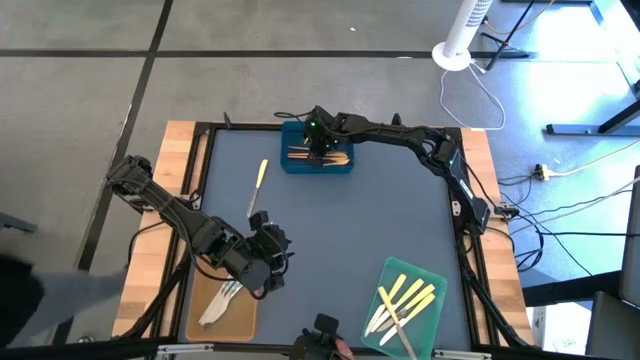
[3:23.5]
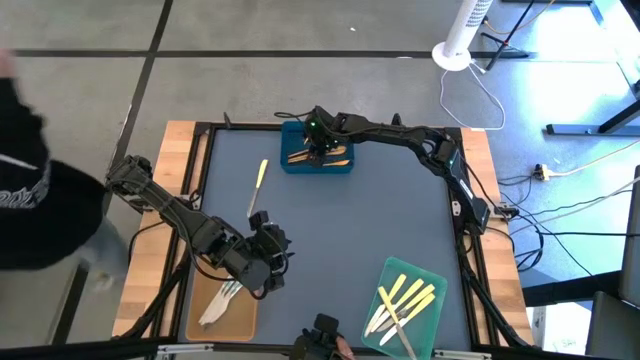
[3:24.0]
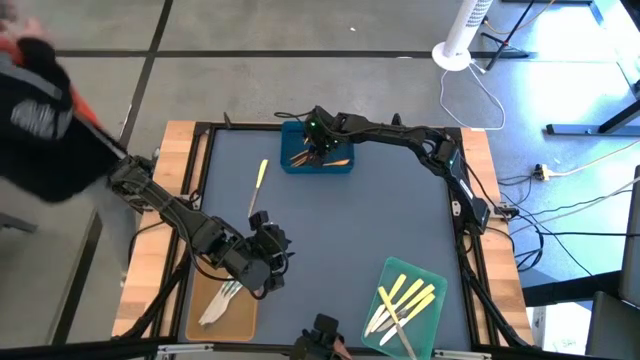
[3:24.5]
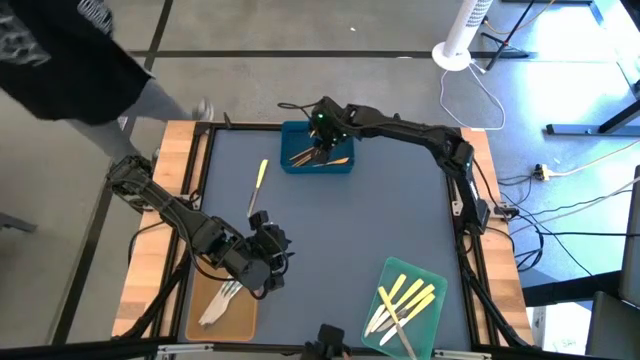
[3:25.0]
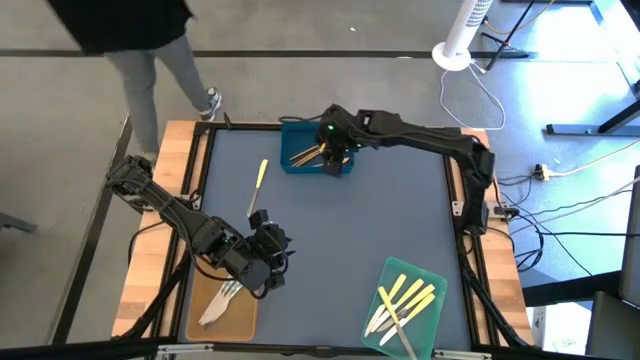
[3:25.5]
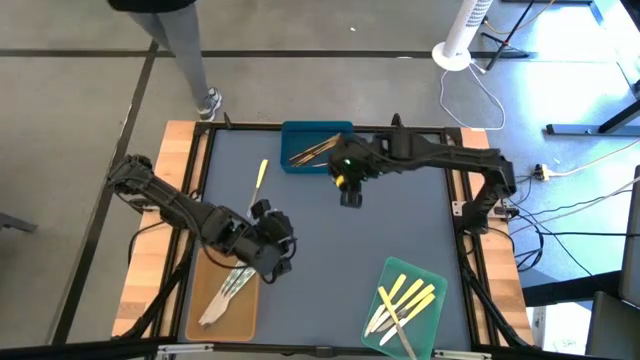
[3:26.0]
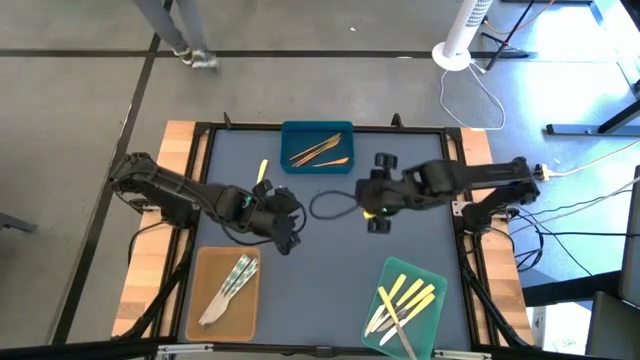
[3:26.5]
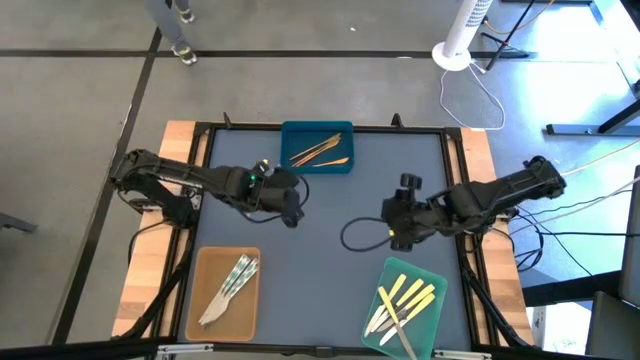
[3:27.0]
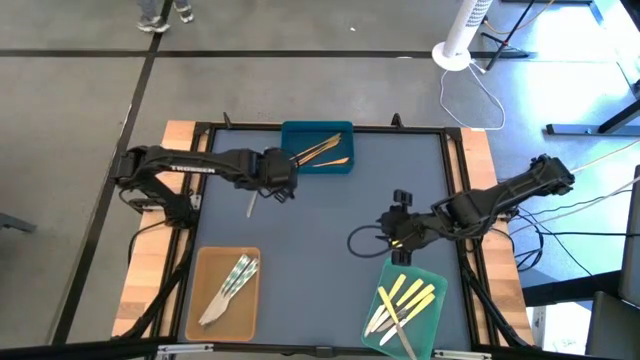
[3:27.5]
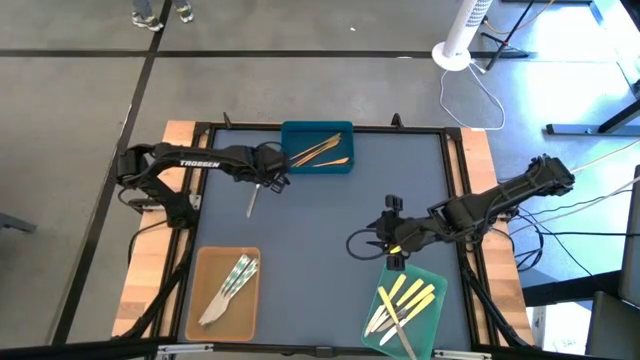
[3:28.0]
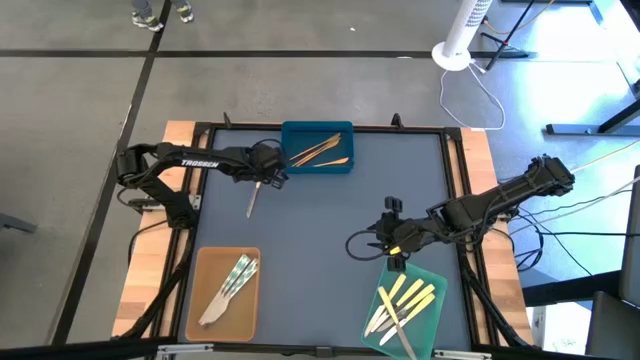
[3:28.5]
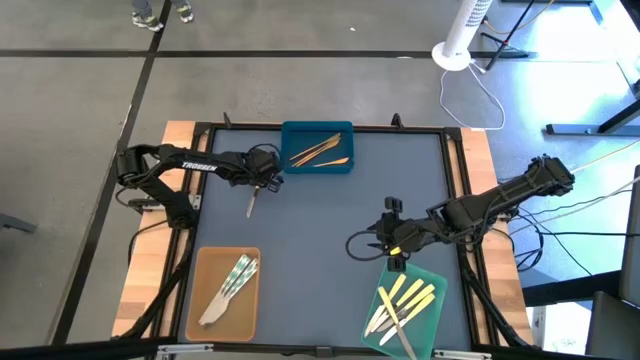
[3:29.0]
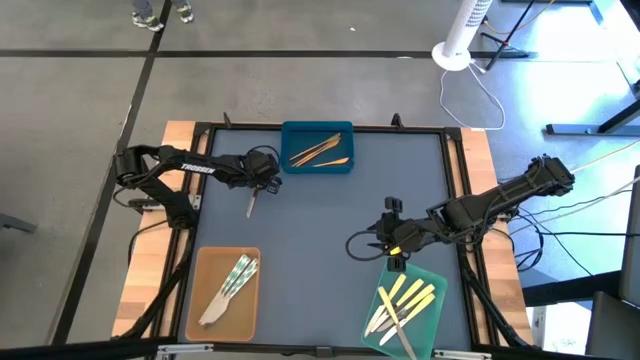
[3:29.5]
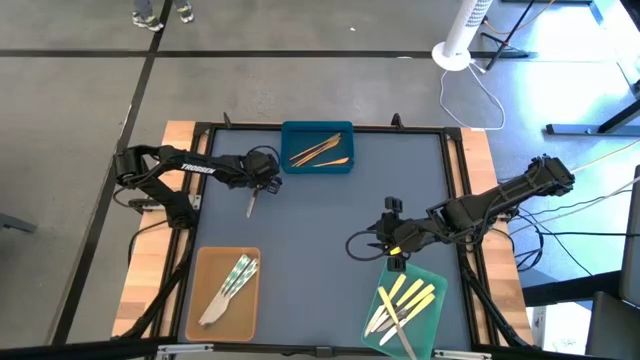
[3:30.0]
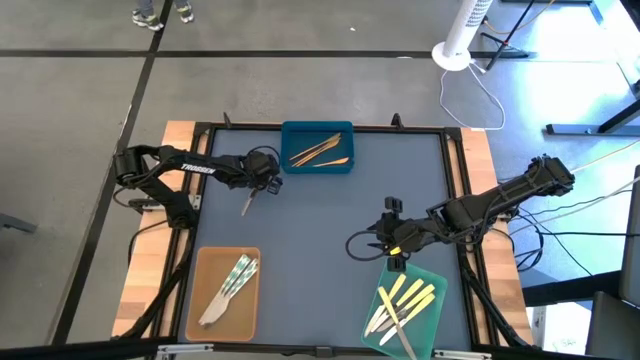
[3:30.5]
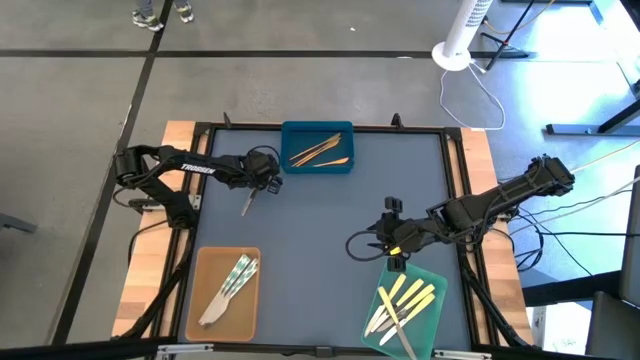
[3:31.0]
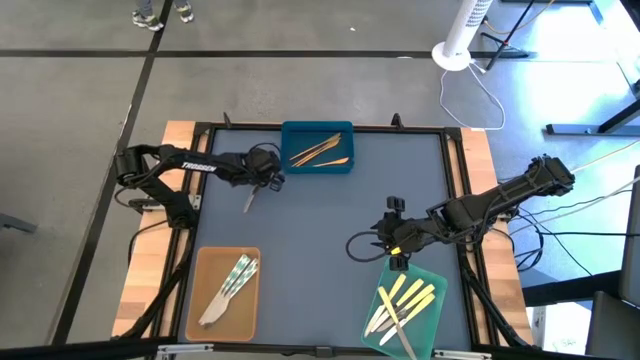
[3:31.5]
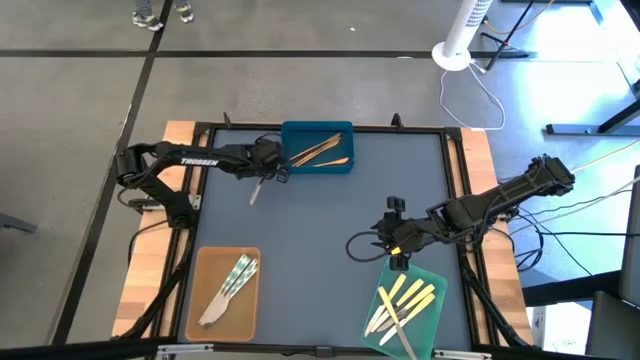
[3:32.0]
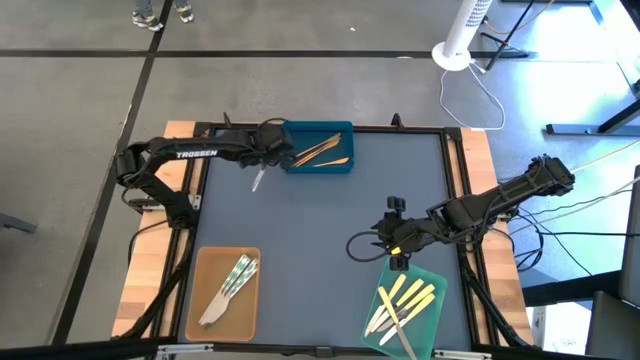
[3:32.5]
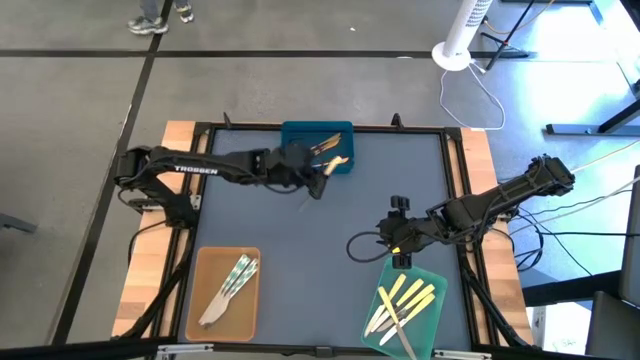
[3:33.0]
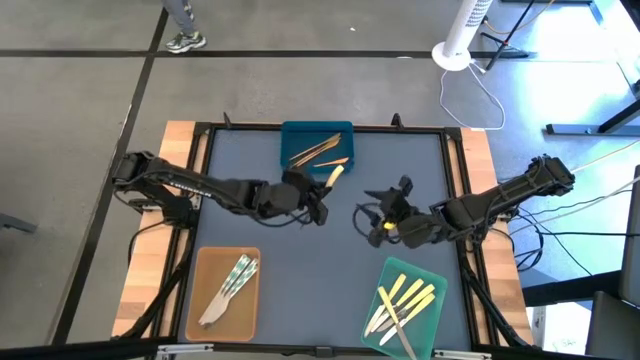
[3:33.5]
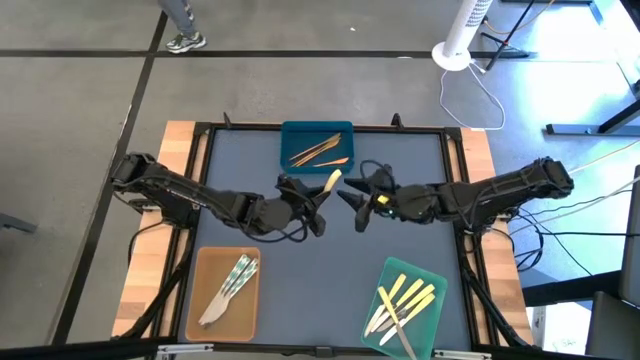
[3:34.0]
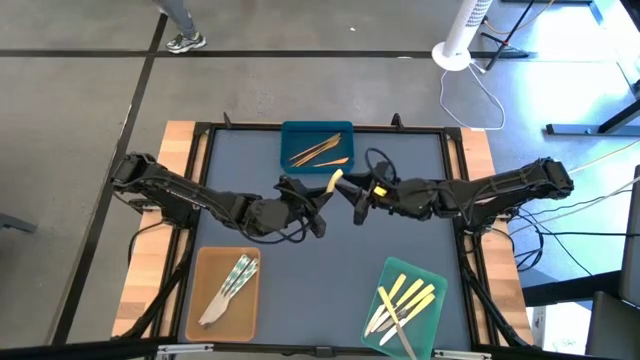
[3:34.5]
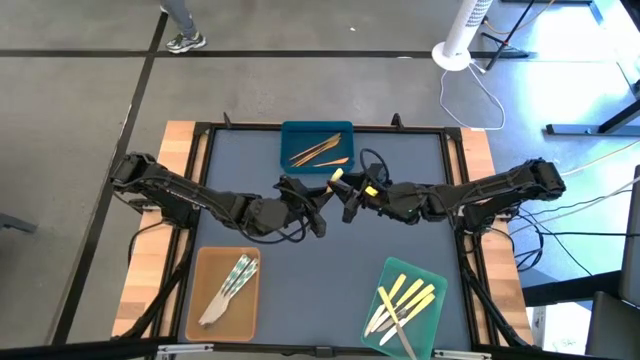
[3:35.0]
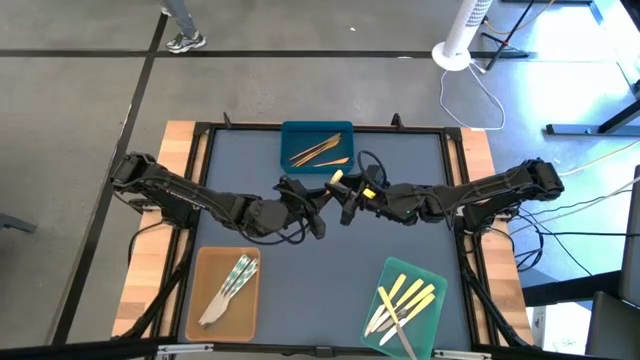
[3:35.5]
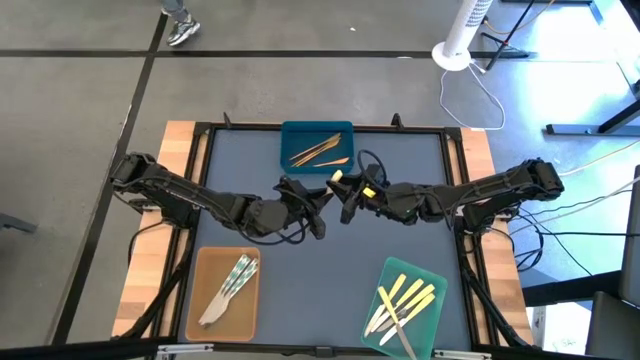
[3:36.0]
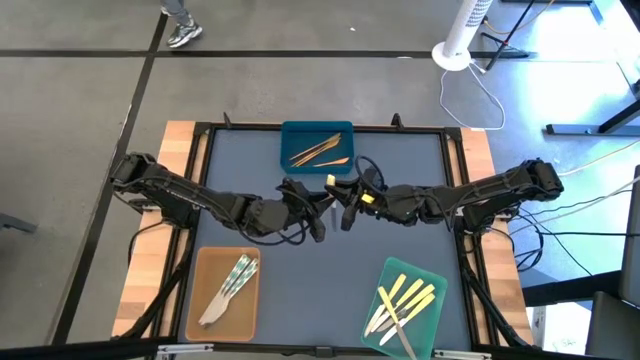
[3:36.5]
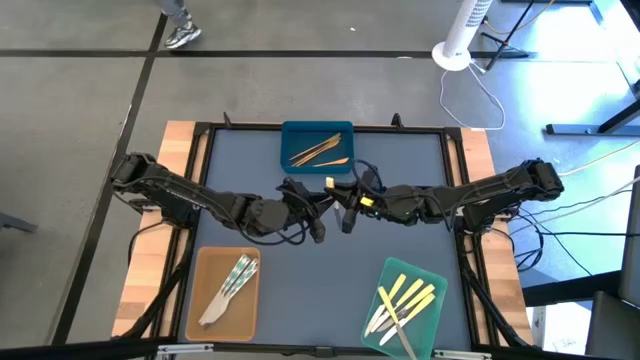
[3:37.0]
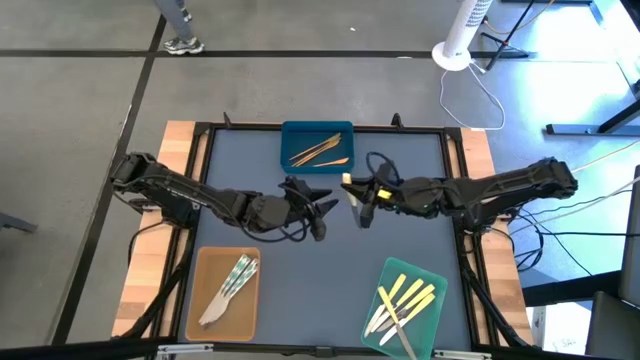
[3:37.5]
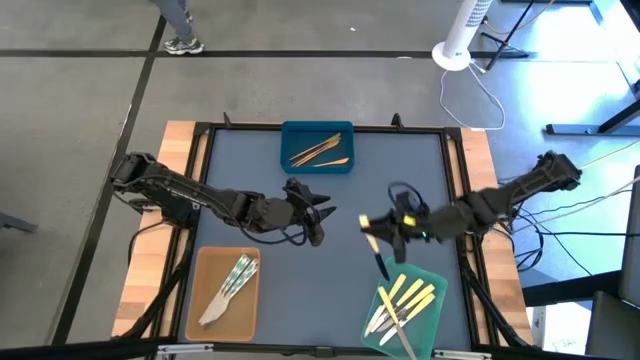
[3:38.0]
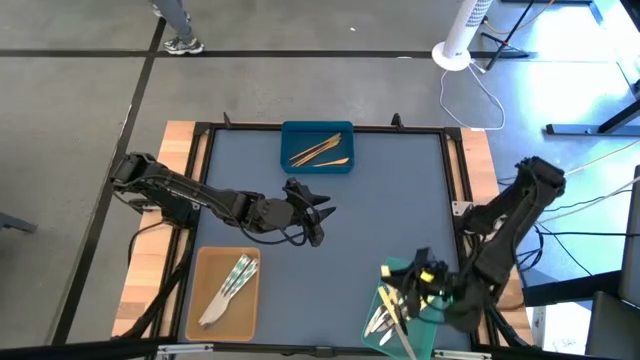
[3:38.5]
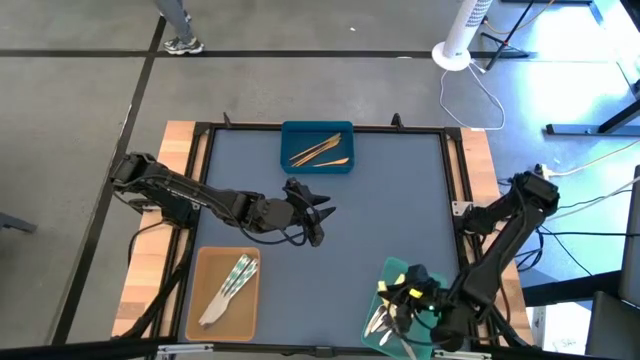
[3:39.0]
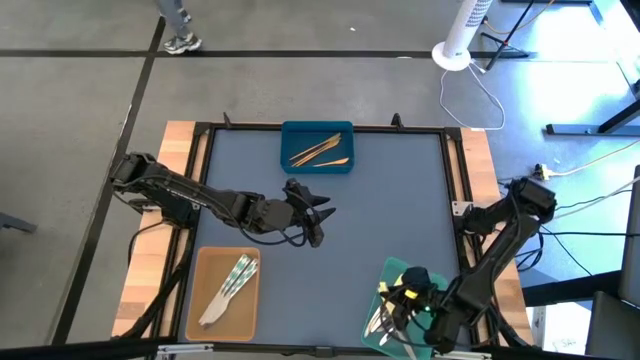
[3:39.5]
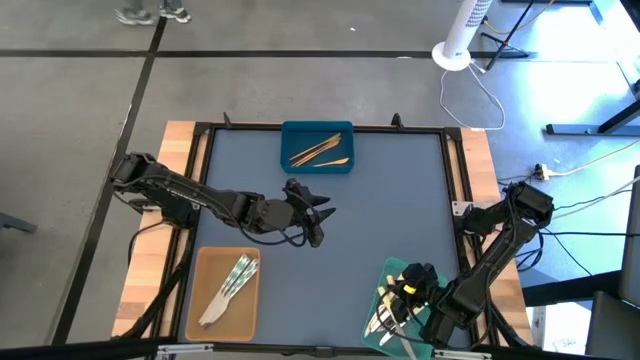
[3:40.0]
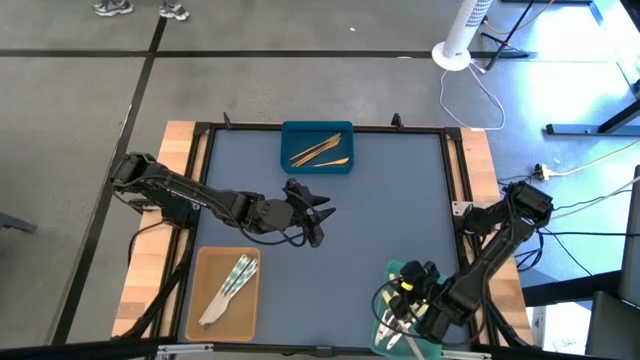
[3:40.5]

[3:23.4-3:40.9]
Task: Sort silverware by color (type)
Put the yellow knife into the green bin

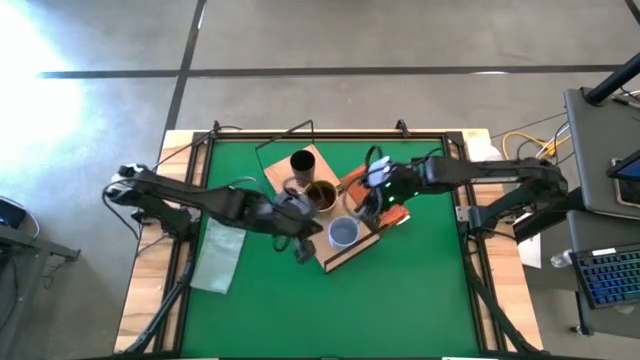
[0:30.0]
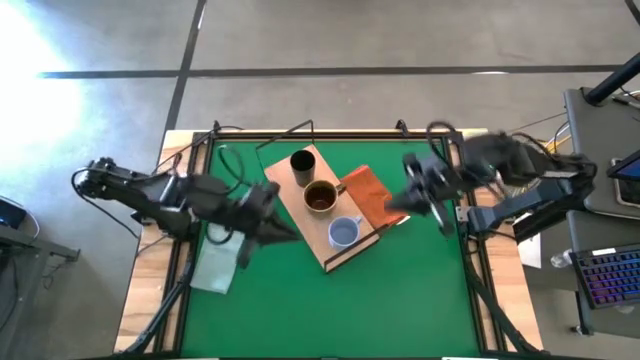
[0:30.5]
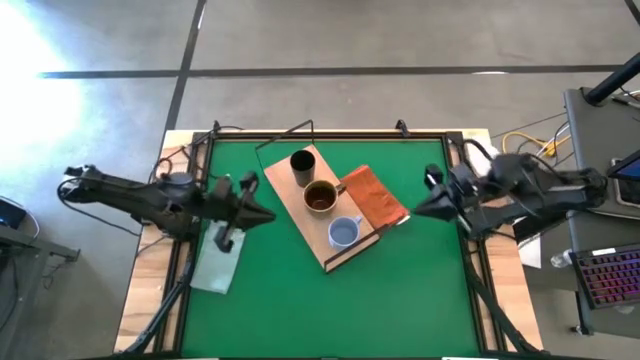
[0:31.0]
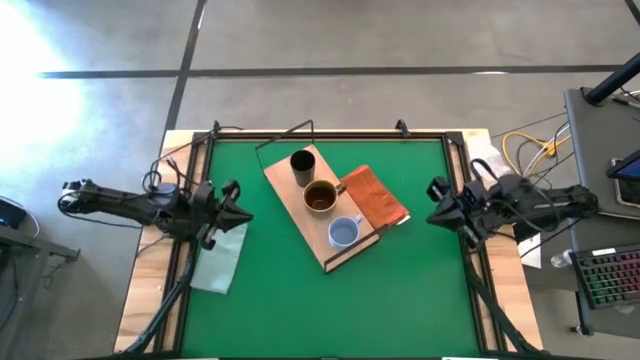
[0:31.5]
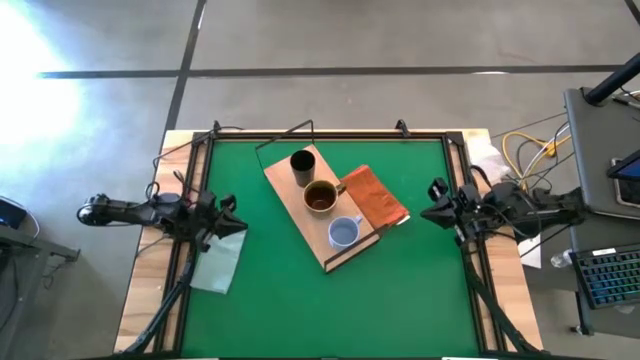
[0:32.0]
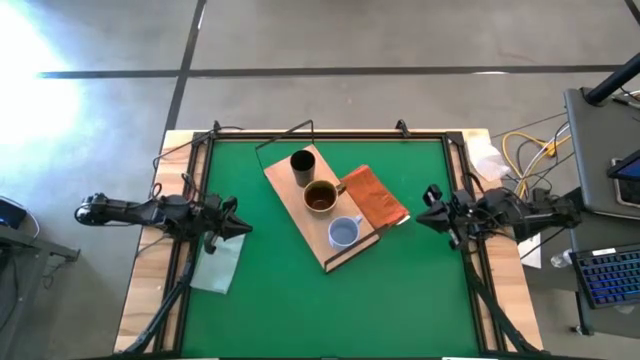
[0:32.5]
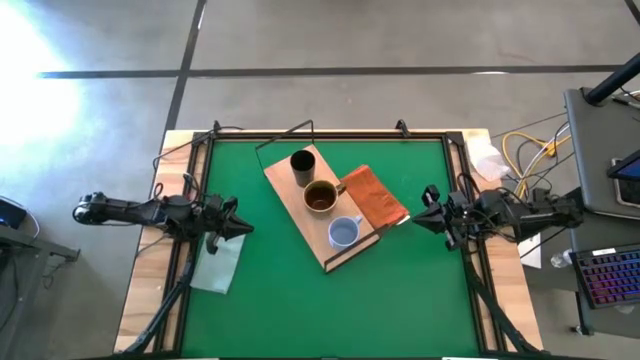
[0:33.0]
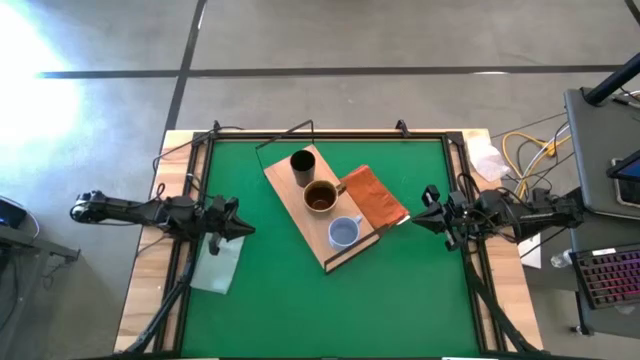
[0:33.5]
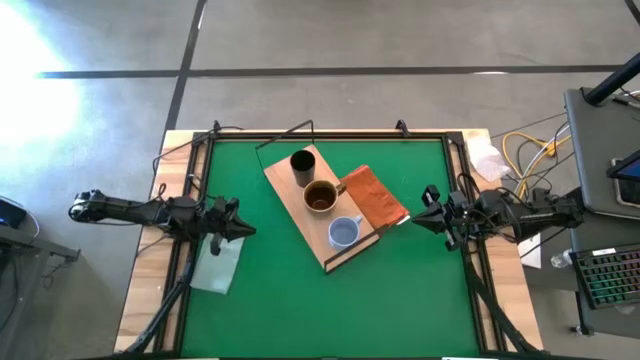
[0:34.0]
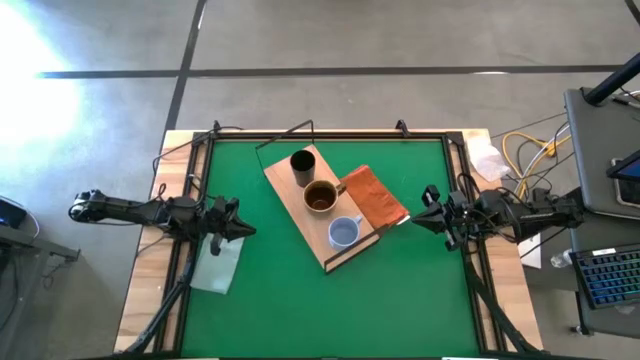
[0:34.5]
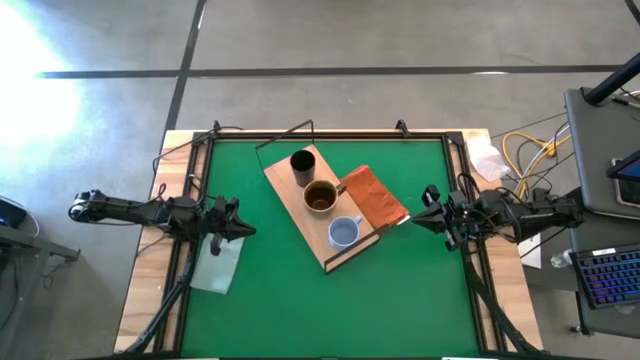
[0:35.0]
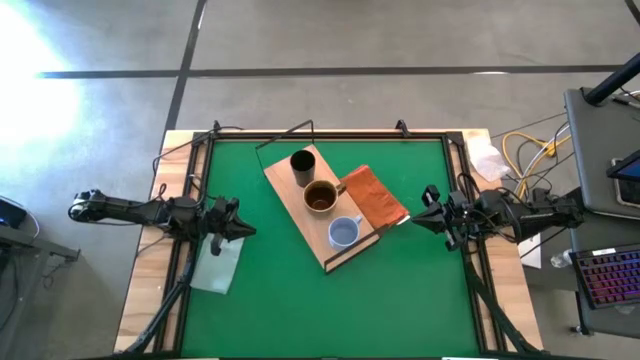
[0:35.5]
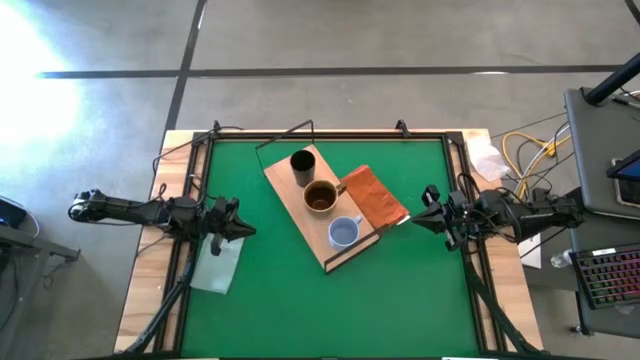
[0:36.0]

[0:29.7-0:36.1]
Task: Stack small to large cups/mugs on shelf
Return to Home Position
